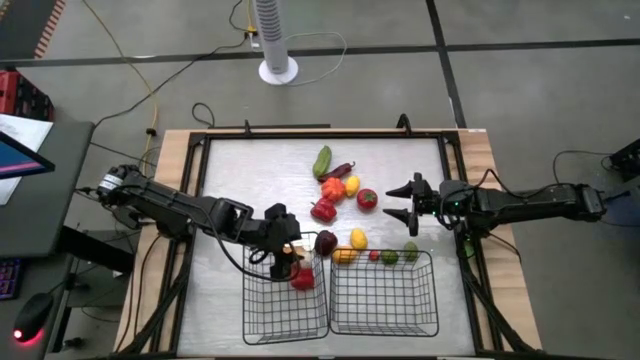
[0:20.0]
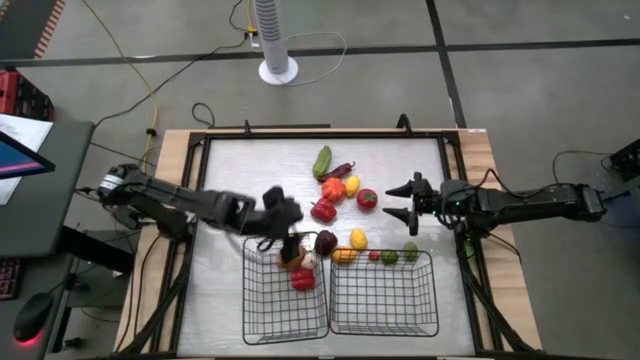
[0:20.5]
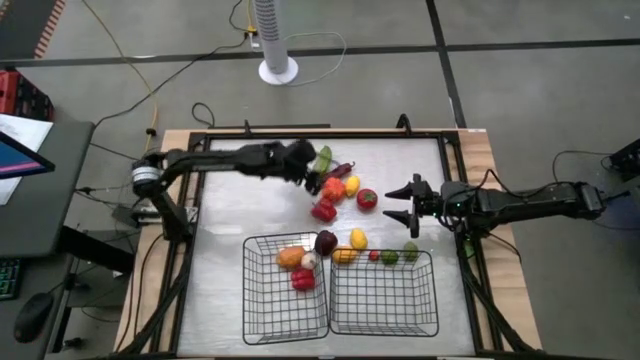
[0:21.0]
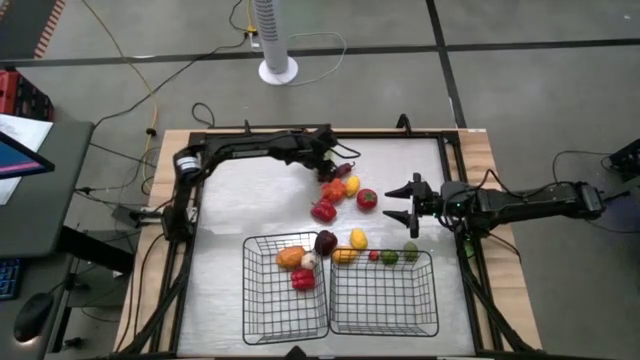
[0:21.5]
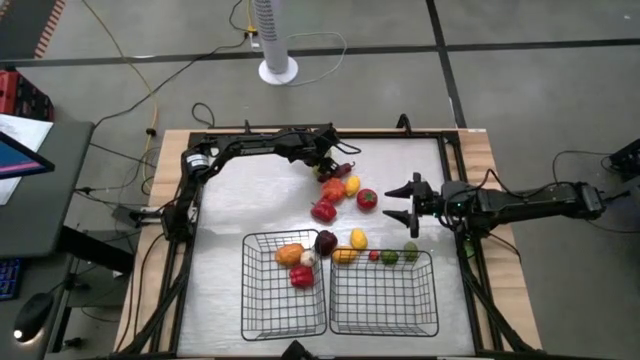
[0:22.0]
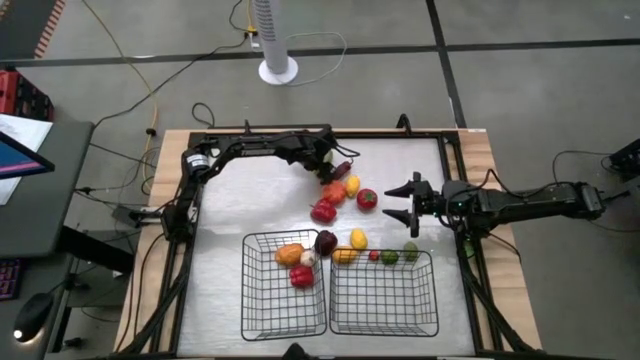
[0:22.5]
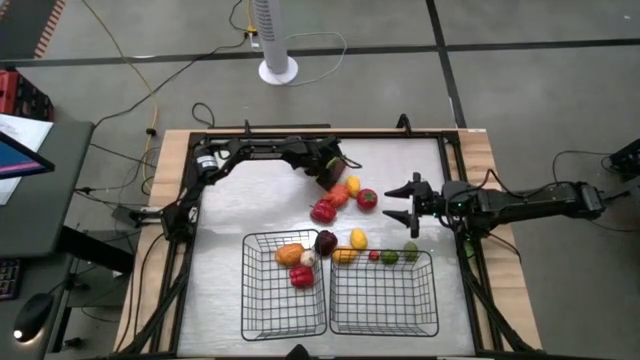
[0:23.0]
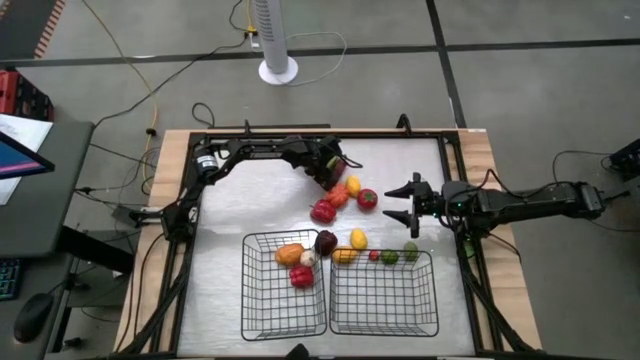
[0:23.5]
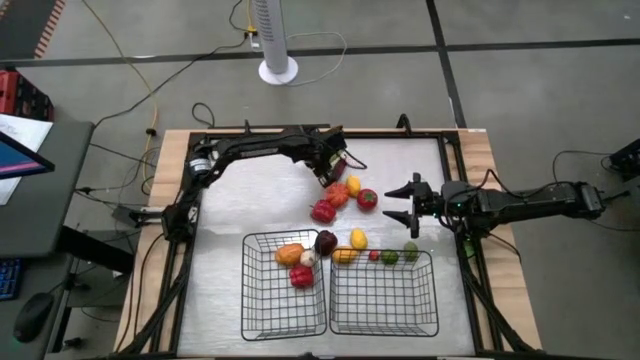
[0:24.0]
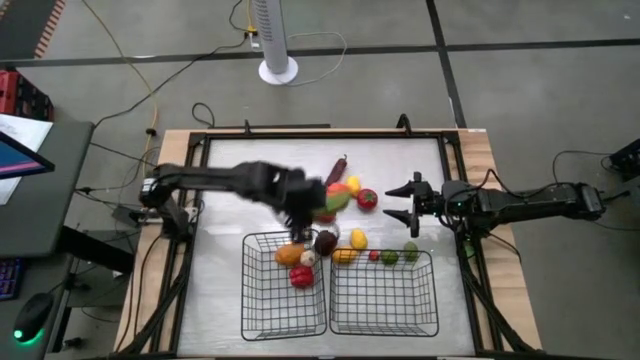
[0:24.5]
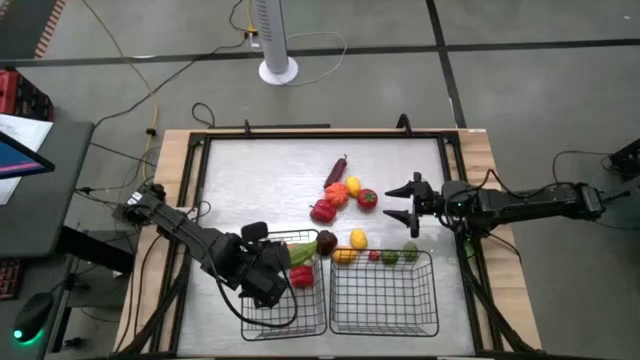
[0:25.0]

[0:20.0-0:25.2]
Task: Sort produce into baskets
Put the green cucumber into the left black wire basket

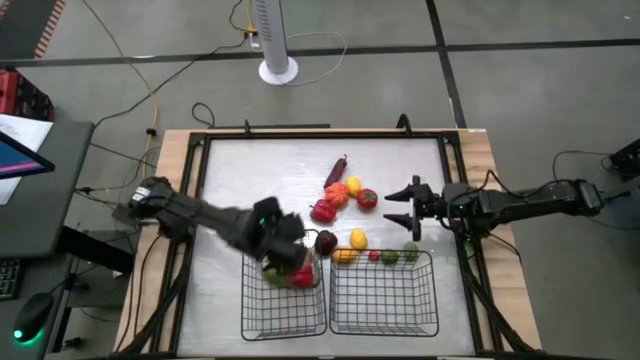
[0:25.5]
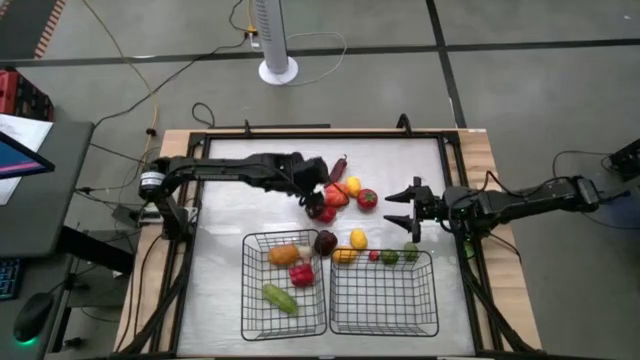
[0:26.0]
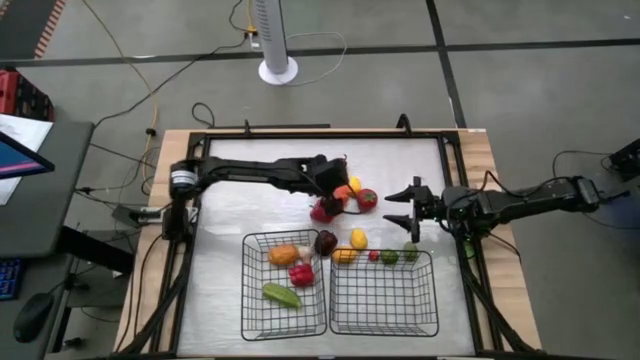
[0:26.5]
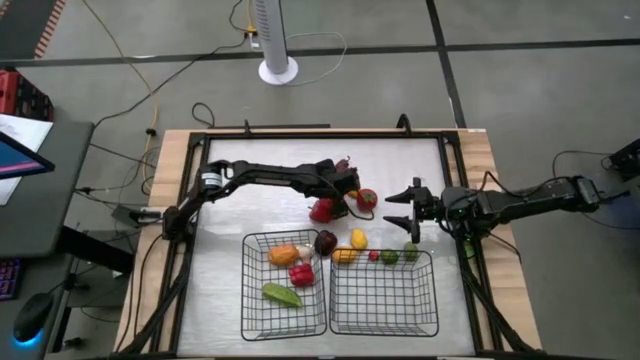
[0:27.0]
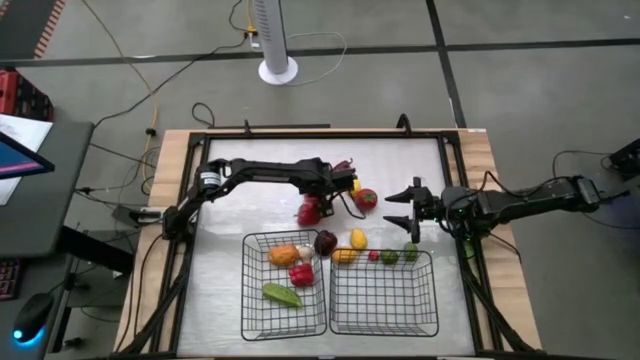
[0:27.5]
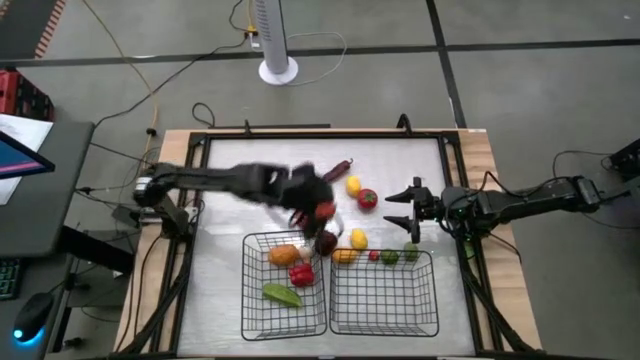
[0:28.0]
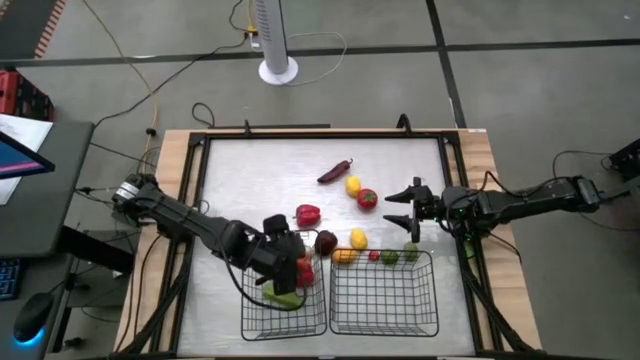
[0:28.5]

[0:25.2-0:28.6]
Put the orange pumpkin into the left black wire basket

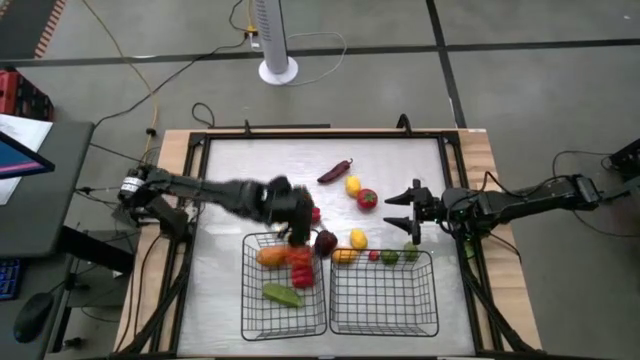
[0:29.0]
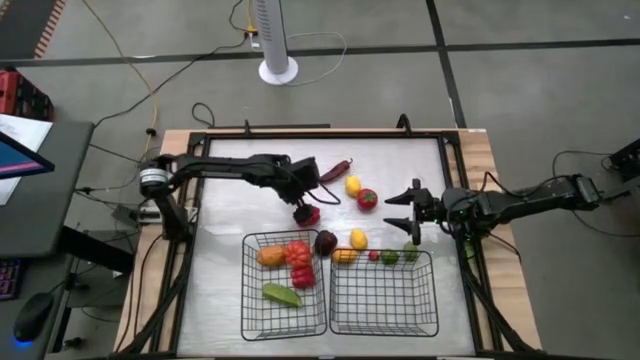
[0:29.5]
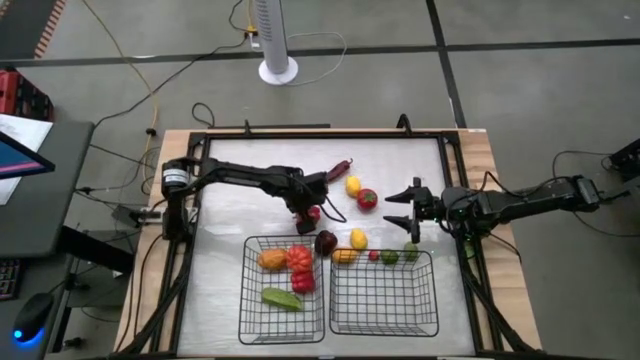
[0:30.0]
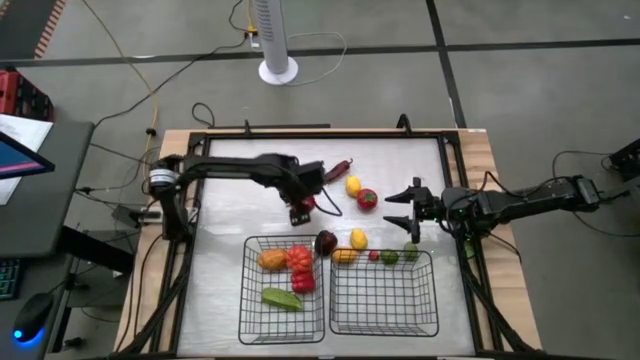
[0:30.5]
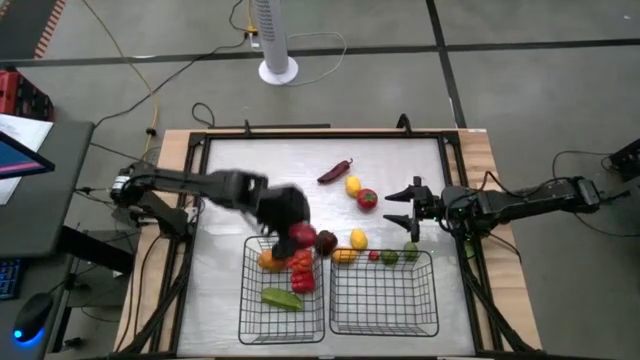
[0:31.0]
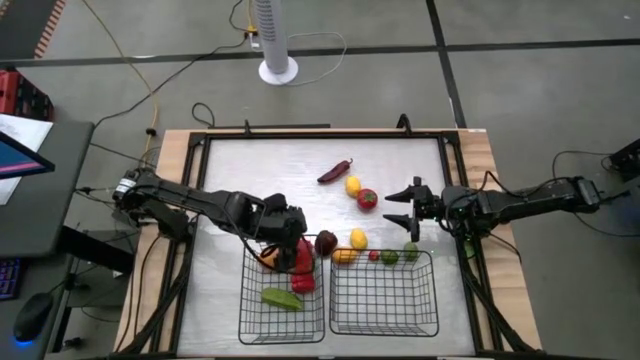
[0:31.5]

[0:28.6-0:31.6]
Put the red bell pepper into the left black wire basket

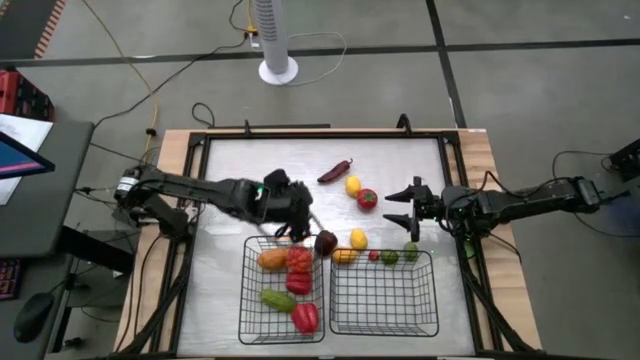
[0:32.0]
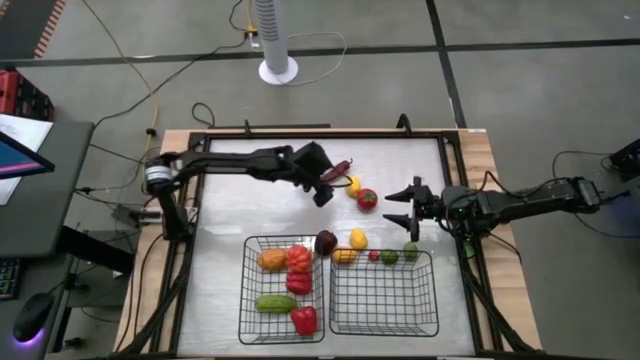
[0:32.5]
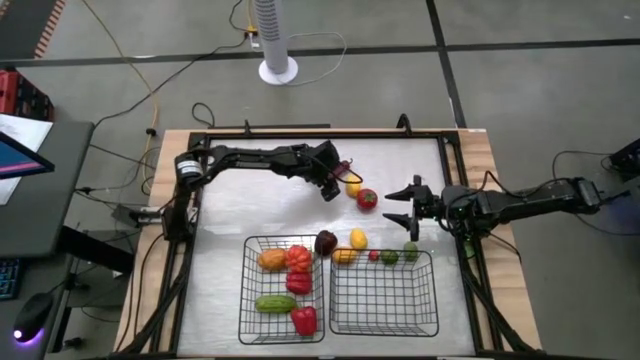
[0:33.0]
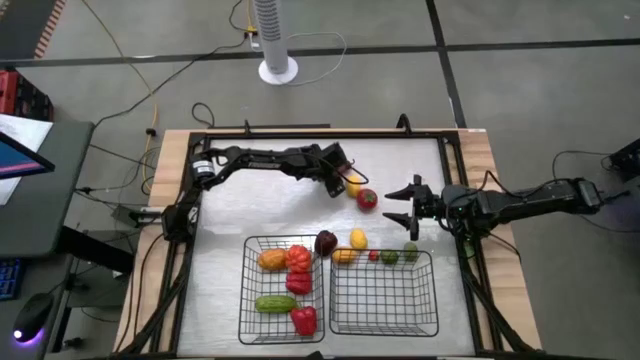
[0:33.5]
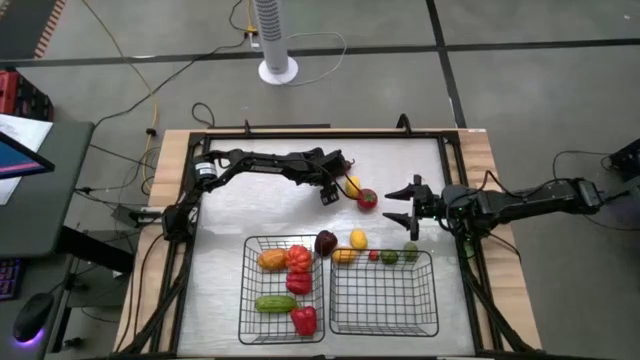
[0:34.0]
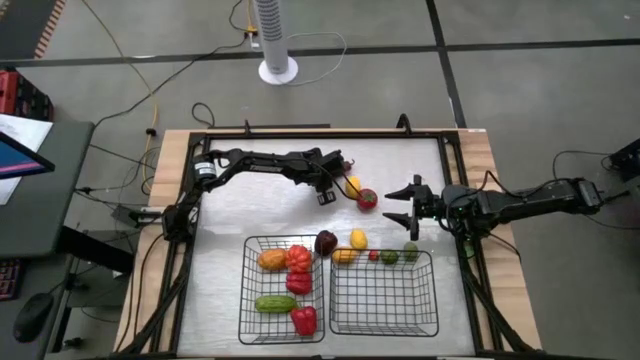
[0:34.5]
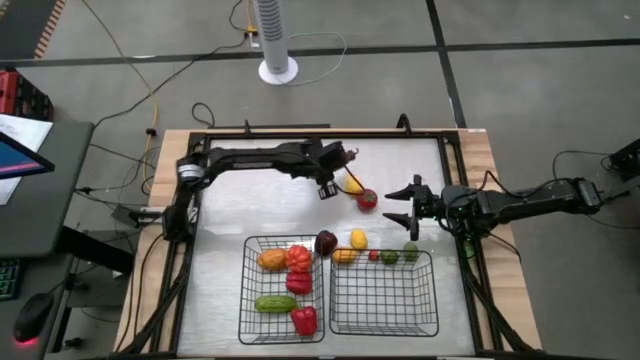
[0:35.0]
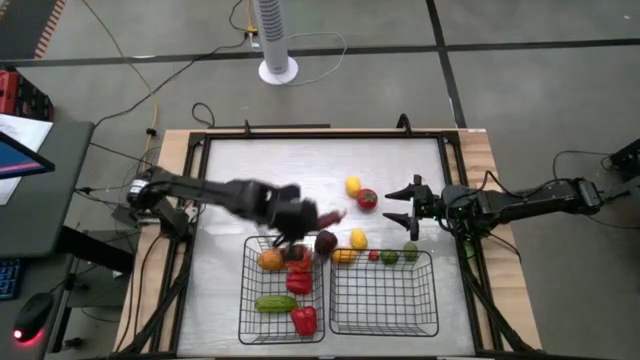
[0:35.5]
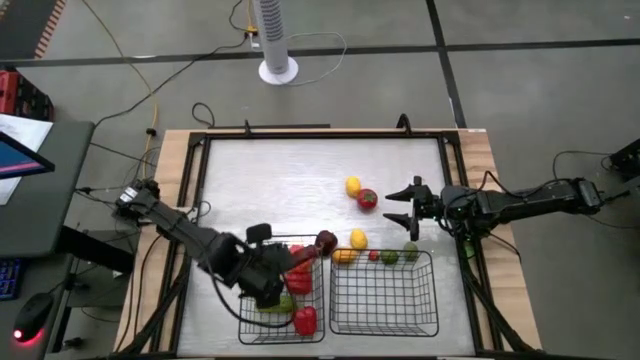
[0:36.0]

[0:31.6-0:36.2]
Put the red chili pepper into the left black wire basket

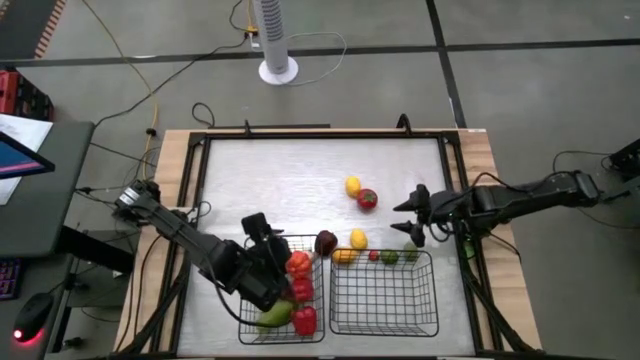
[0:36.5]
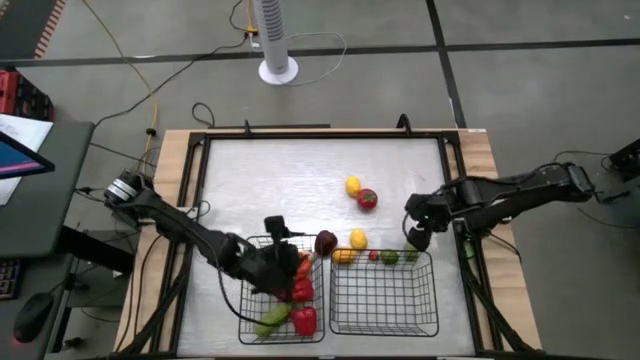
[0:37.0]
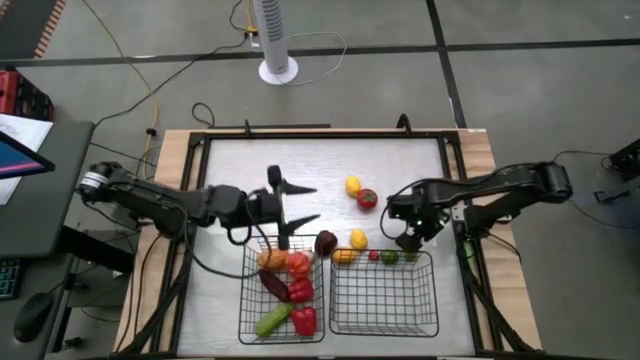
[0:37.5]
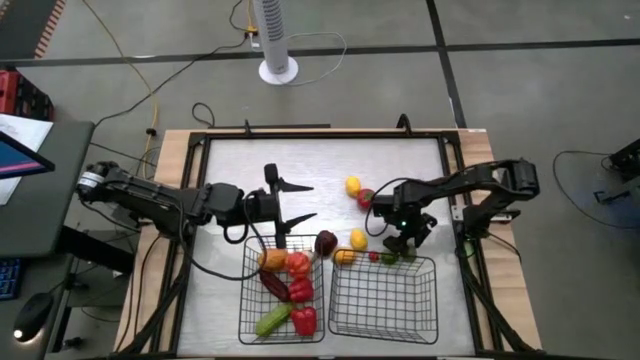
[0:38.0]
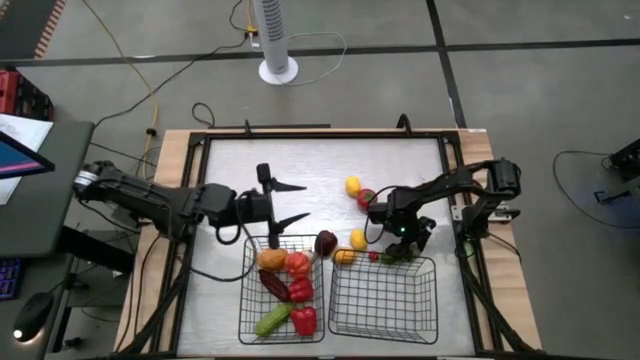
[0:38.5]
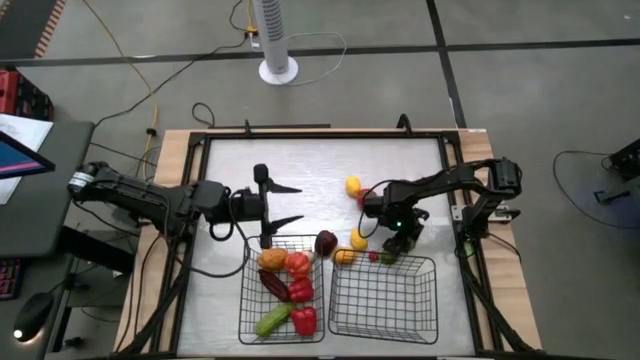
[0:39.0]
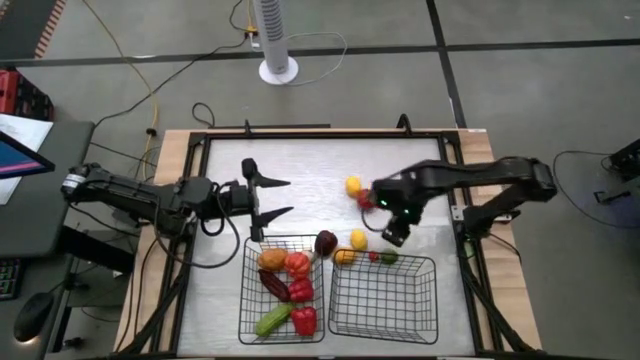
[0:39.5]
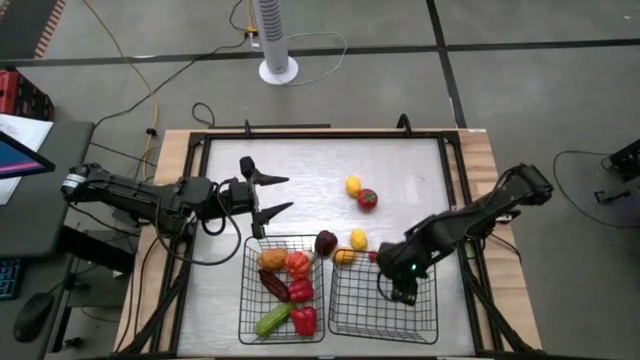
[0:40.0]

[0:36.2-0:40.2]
Put the right green lime into the right black wire basket

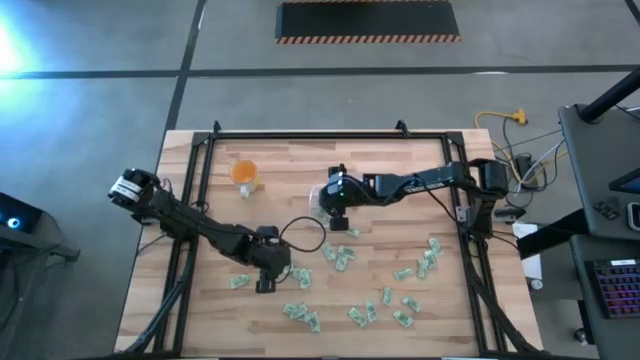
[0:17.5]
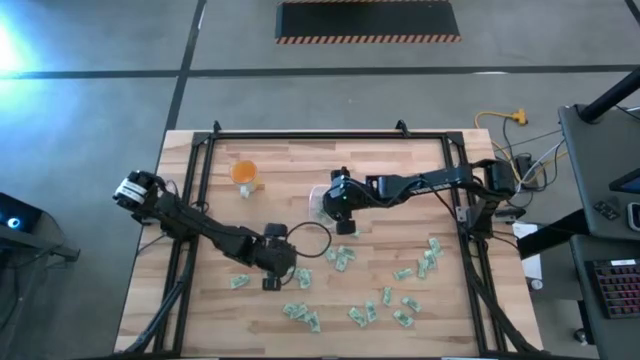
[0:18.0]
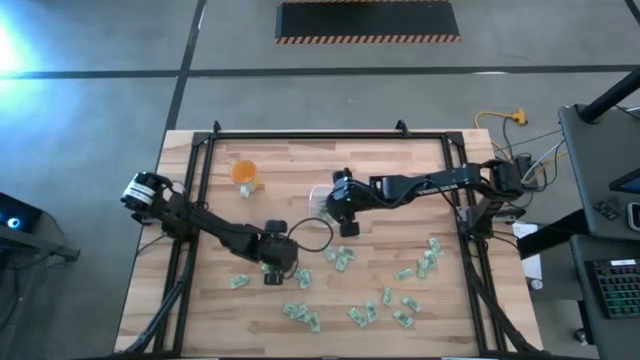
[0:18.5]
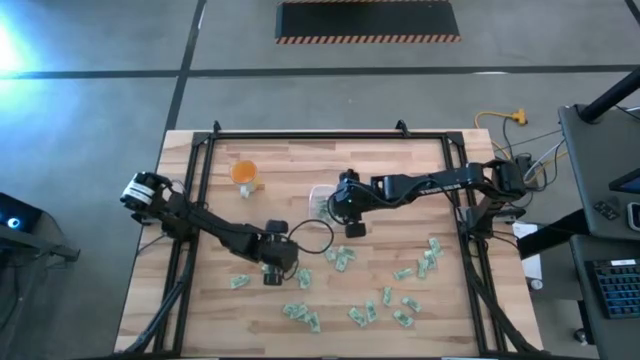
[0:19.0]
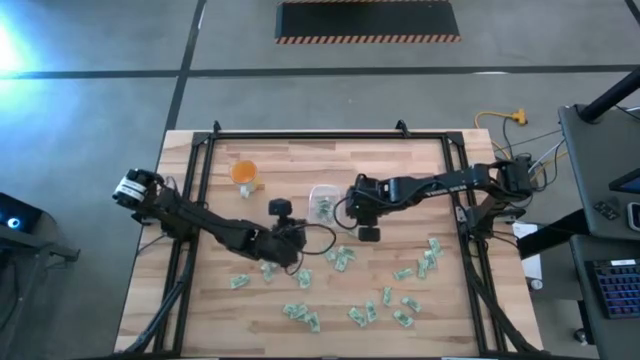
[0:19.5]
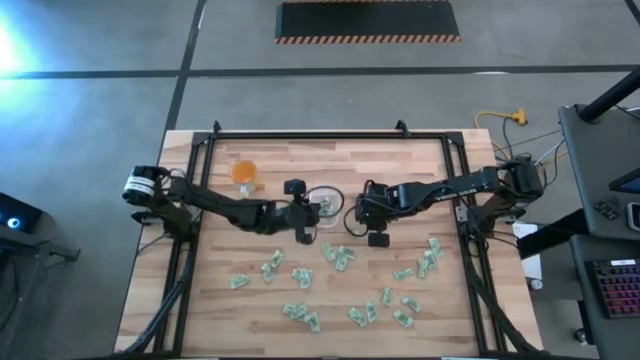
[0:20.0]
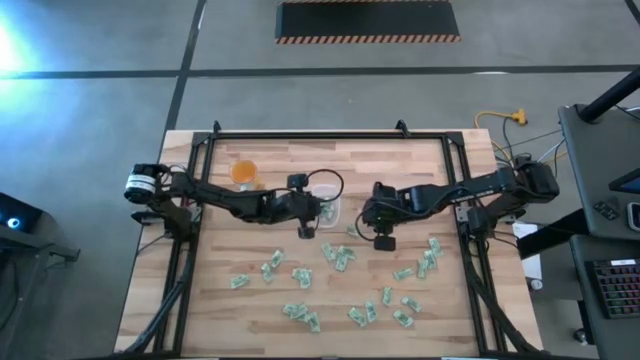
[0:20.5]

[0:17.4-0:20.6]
Task: Pick and place Stevia / Truvia into bins
Put the stevia packet into the bin
